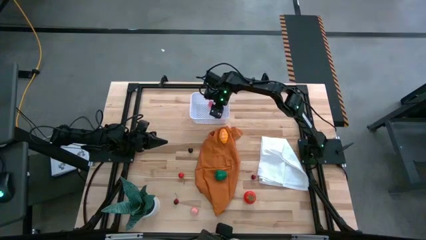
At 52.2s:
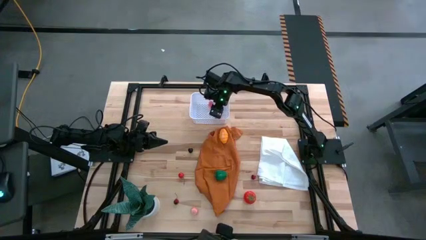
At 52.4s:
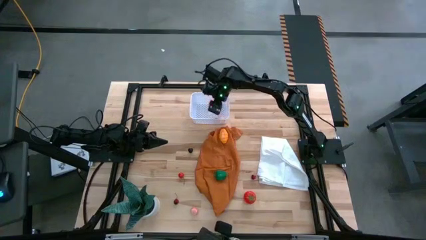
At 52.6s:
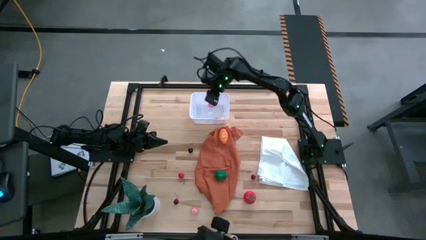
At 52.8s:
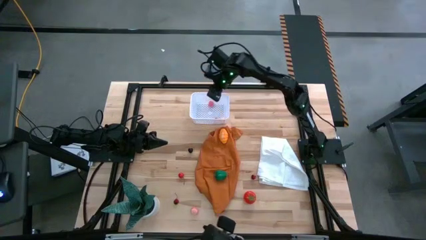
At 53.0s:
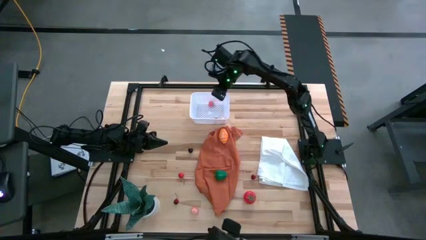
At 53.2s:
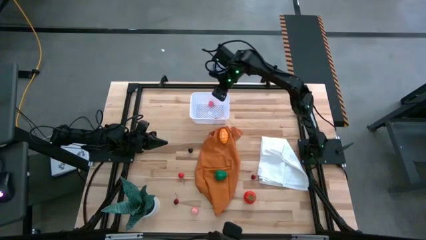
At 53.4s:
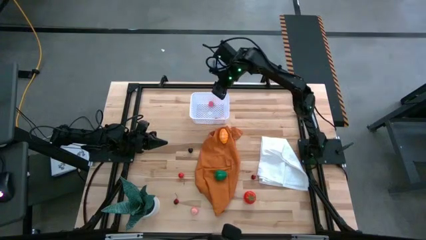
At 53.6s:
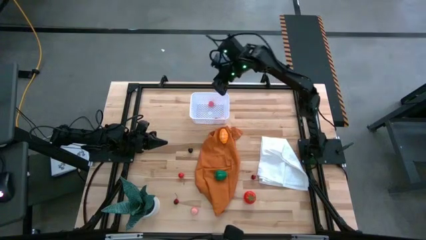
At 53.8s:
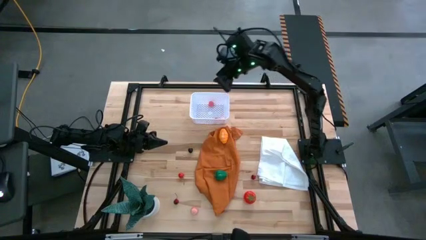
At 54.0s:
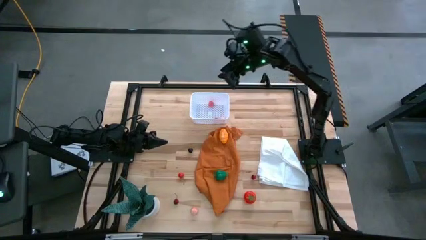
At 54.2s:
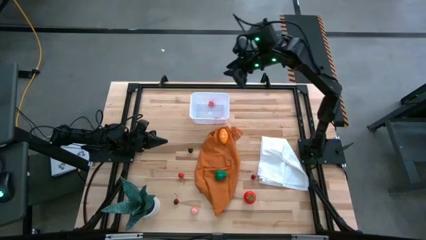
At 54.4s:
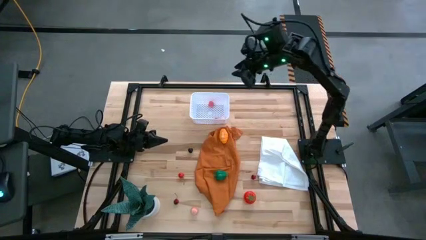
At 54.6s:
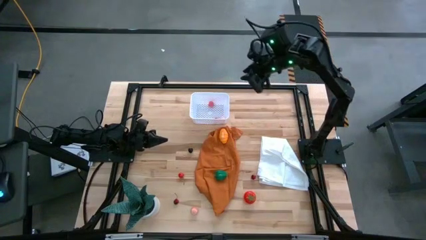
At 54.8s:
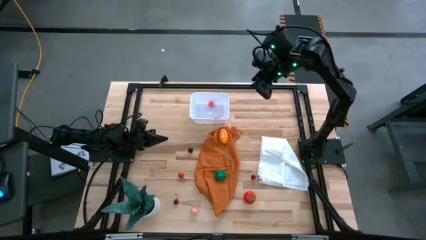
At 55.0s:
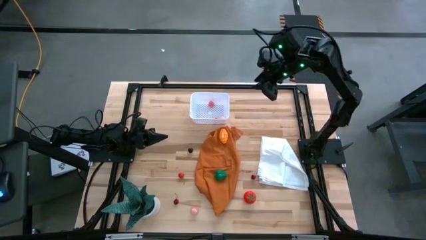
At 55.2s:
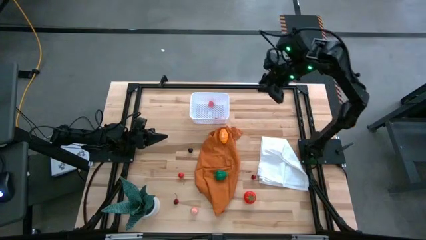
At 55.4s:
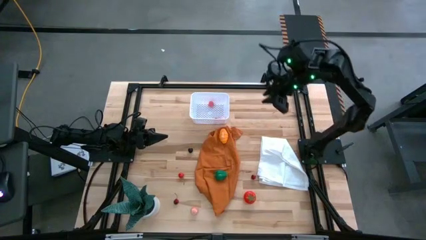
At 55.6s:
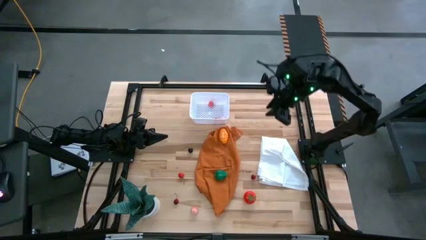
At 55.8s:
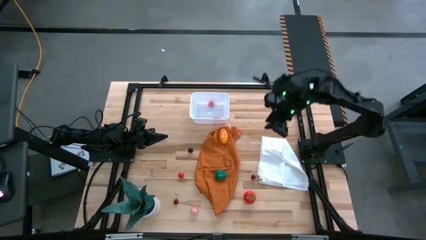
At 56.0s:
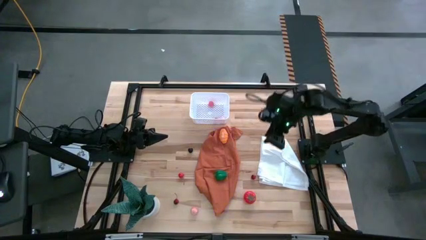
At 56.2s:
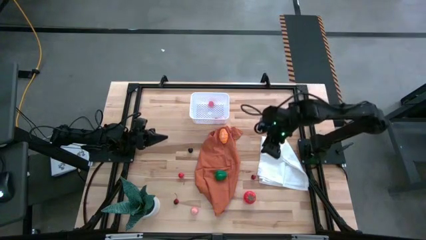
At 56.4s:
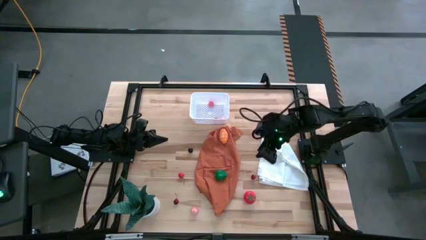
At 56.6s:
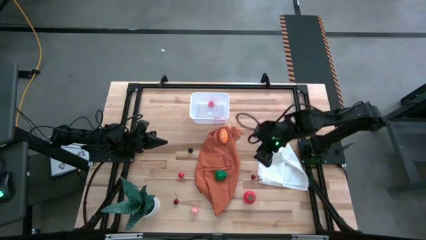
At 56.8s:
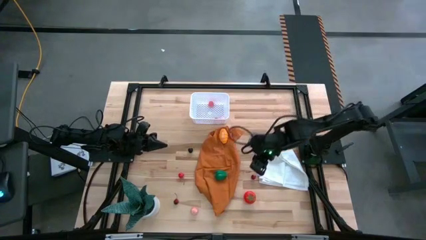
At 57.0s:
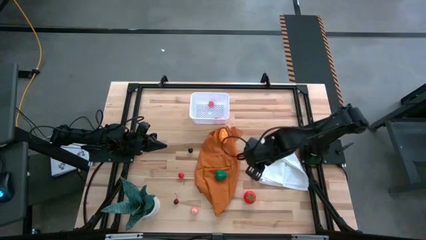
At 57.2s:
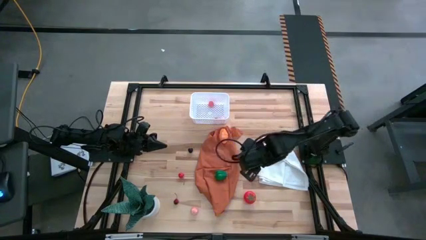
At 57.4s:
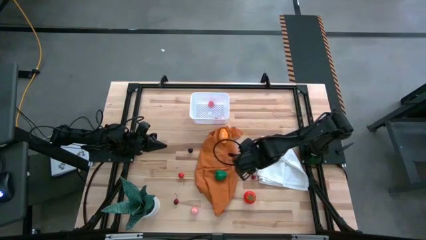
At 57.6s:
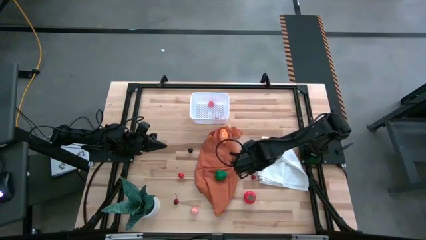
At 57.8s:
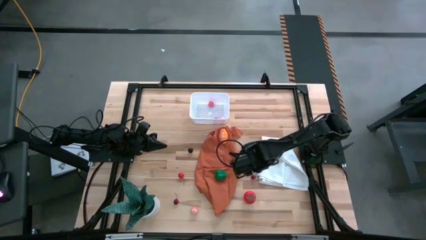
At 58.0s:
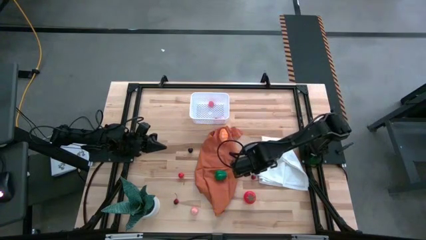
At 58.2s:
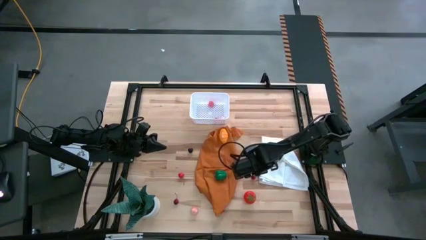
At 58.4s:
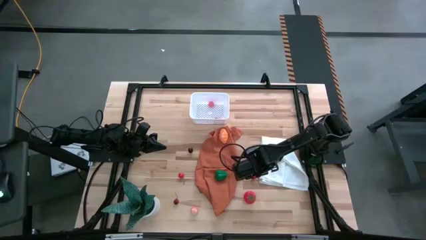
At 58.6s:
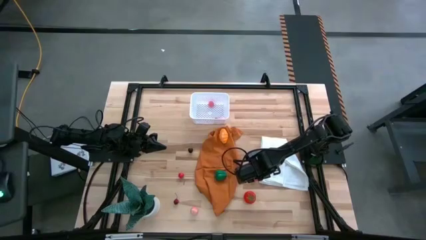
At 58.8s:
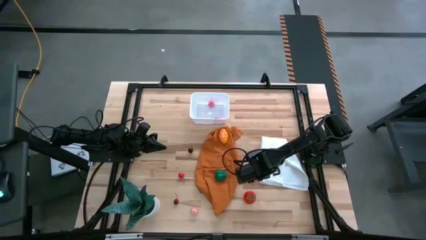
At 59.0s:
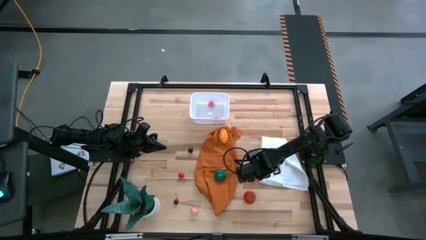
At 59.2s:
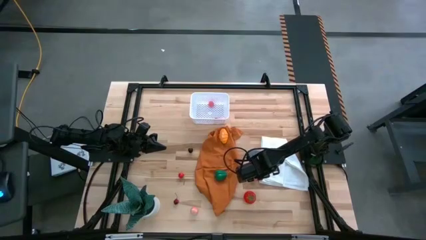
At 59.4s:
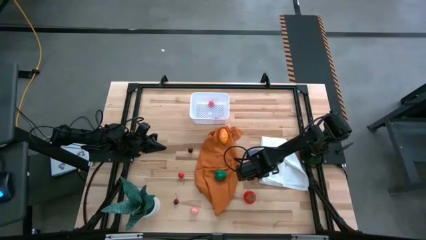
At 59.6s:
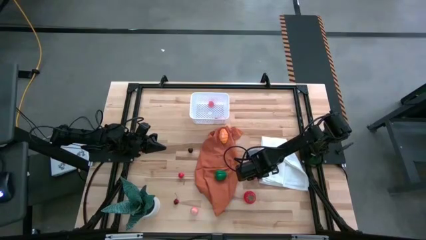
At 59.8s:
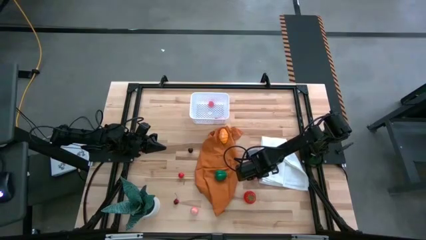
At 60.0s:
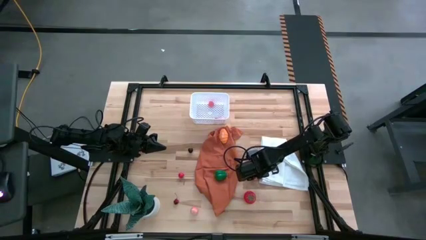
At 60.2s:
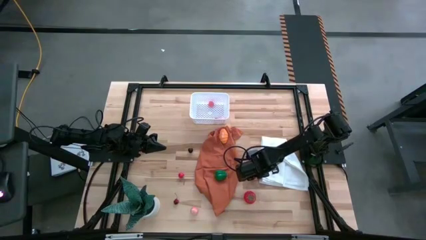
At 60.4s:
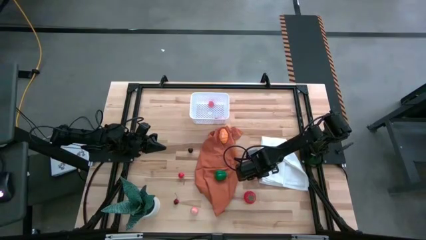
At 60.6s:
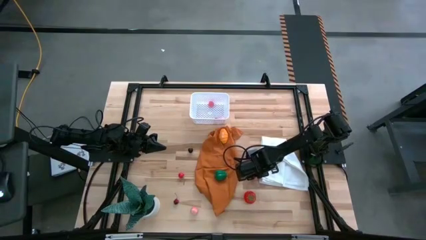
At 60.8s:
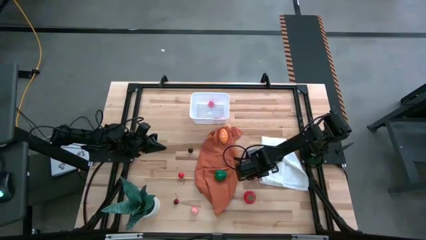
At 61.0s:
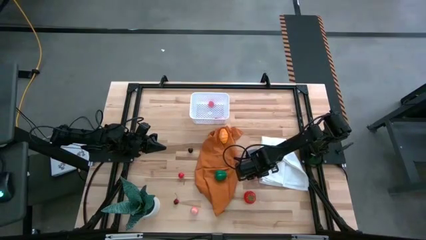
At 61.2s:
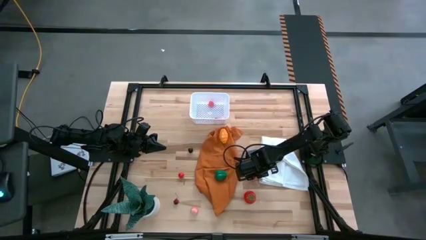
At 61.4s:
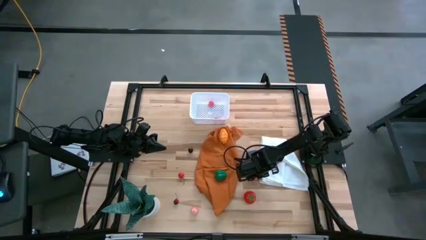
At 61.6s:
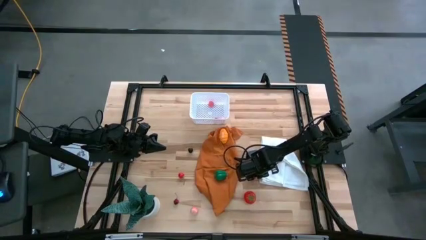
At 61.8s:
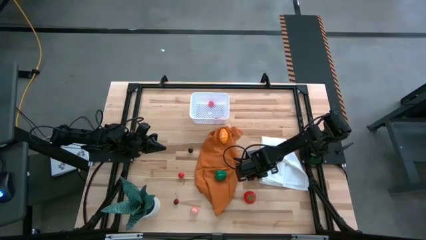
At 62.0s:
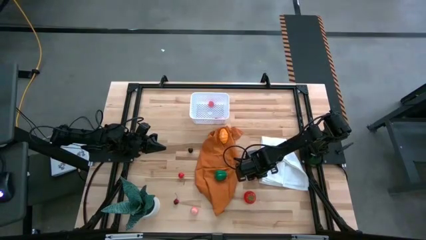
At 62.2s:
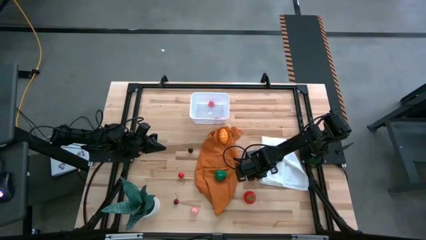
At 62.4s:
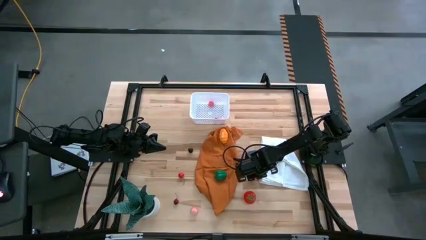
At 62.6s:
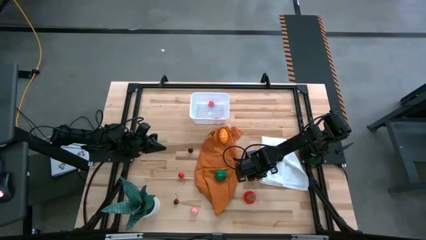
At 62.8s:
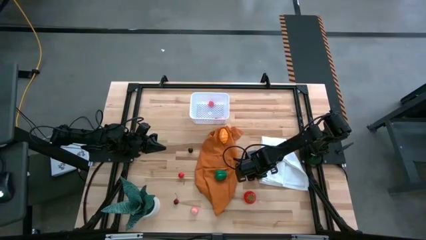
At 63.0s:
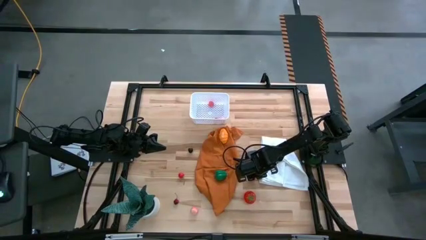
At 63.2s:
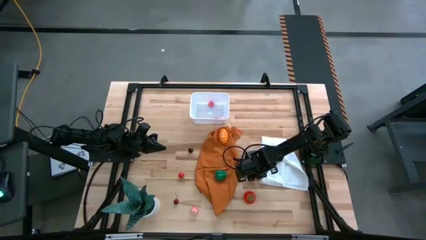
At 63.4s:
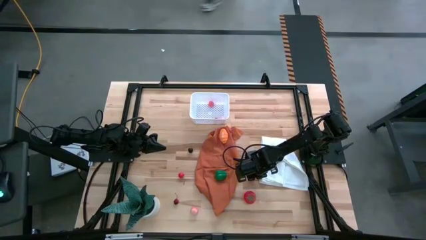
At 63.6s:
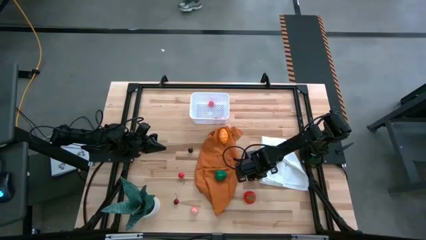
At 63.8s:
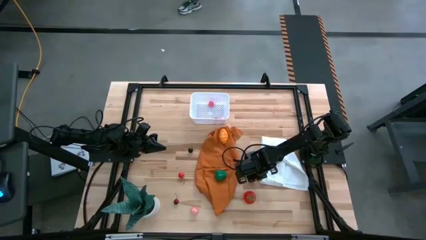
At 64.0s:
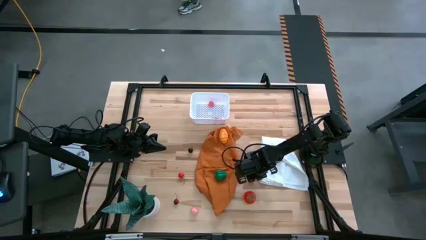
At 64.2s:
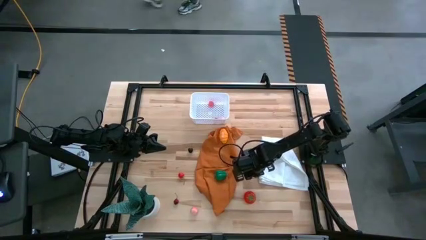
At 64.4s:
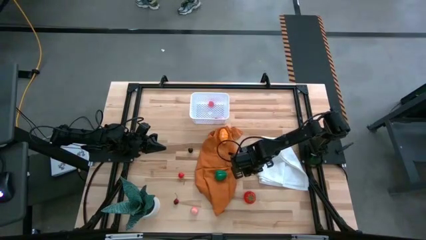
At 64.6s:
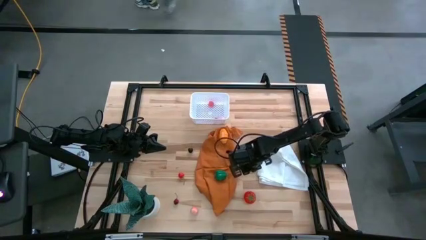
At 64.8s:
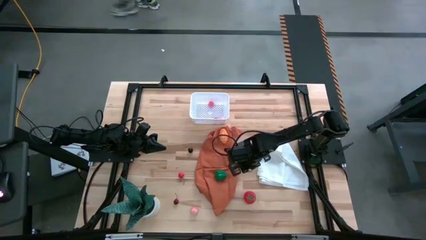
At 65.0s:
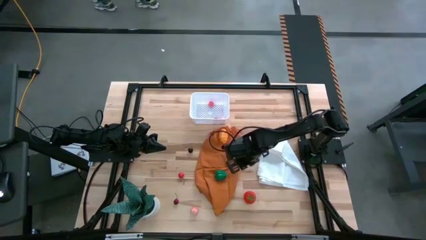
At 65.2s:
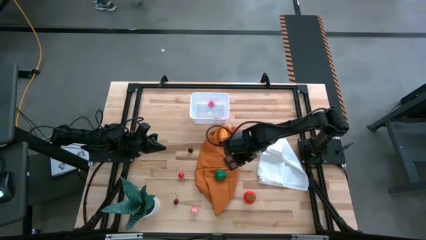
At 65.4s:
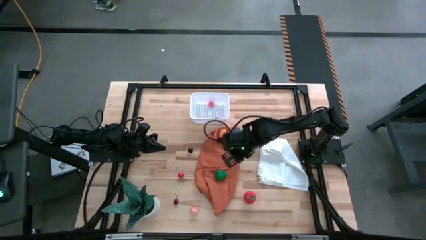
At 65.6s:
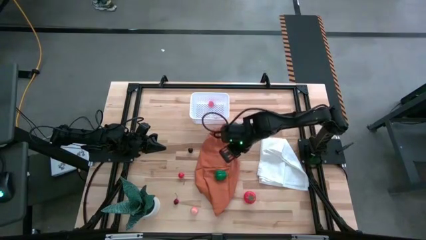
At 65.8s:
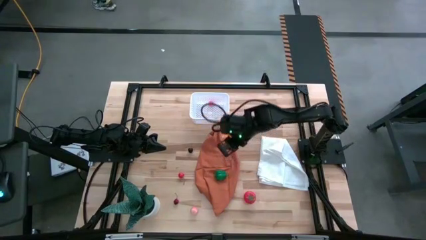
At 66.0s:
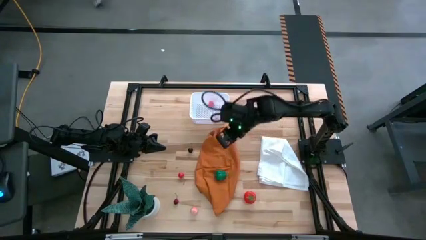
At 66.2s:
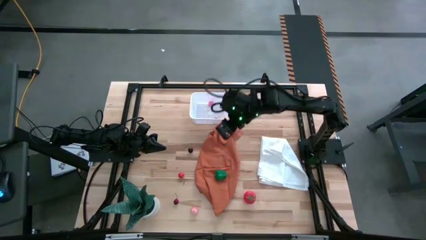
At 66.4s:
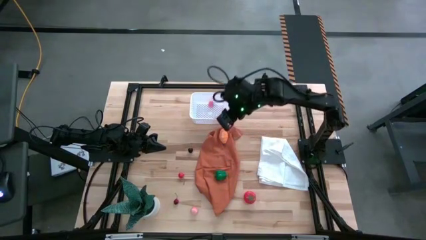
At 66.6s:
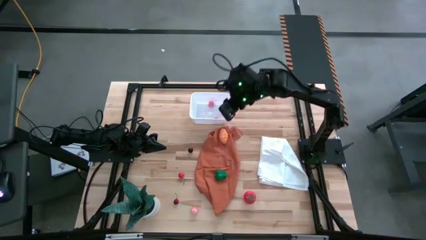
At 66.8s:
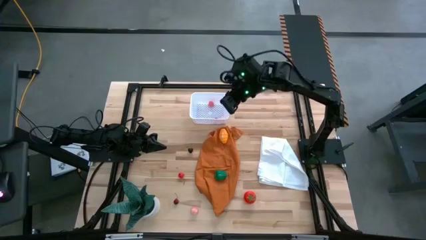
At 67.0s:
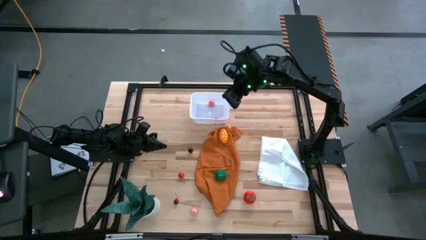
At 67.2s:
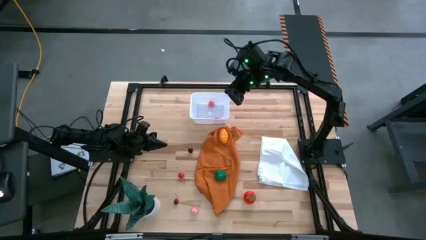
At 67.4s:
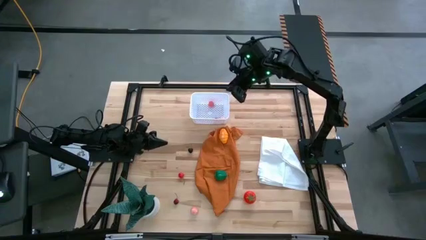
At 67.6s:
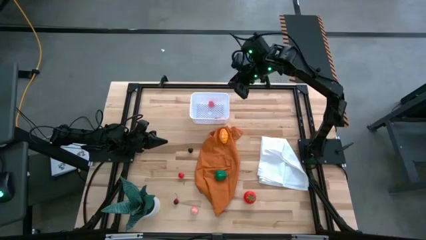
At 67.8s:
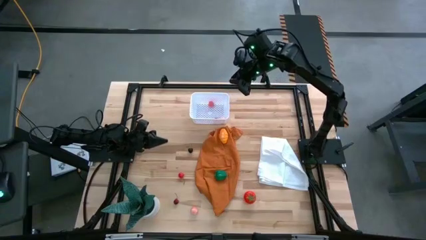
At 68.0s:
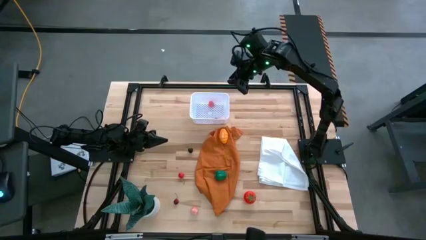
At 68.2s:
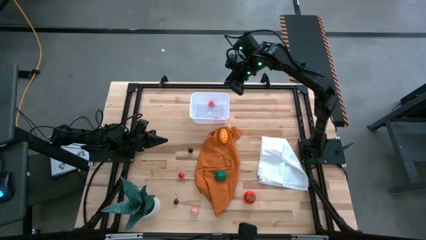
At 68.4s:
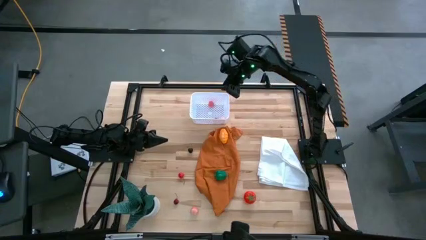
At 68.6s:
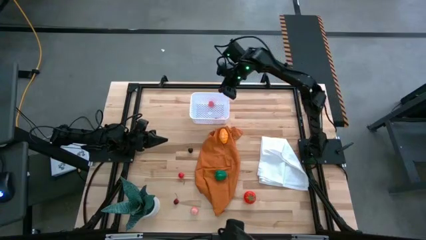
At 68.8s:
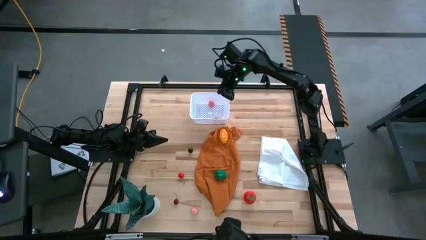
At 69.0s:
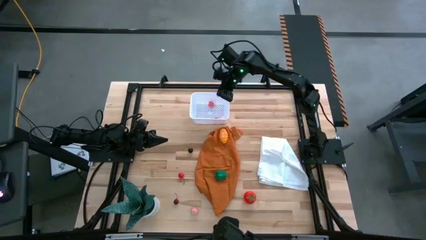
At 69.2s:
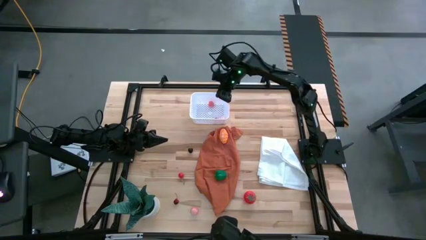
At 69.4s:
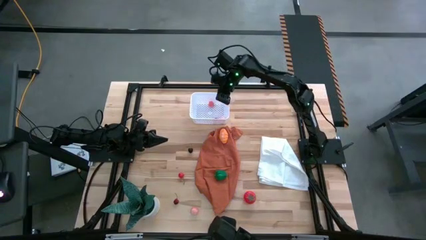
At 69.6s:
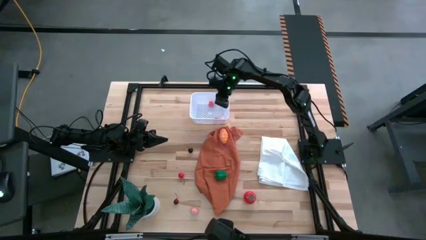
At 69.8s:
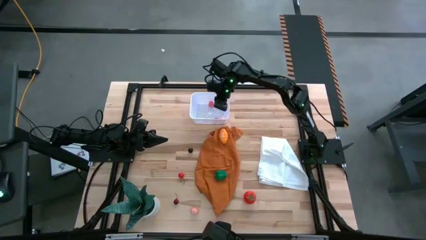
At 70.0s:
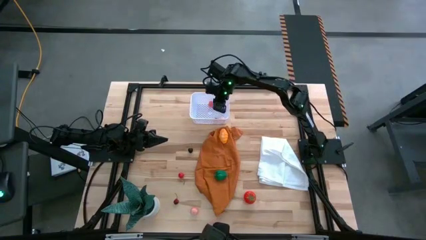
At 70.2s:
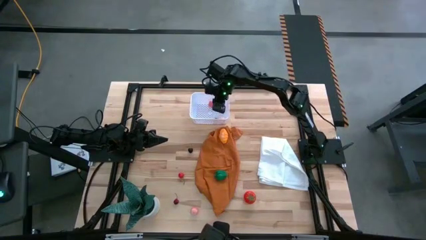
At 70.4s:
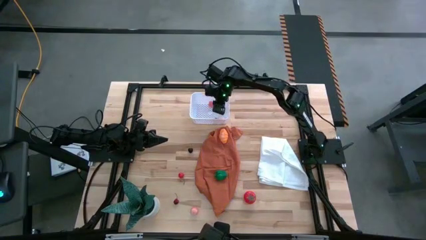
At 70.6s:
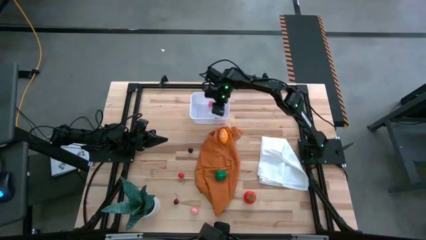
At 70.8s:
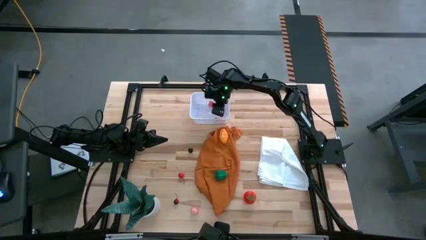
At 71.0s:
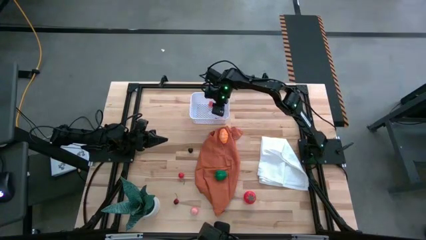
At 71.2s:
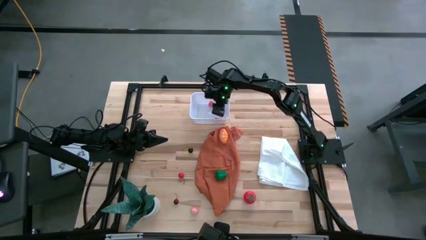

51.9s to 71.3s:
Task: Pick and placing Produce into tupperware
Put the right red cherry into the white basket
